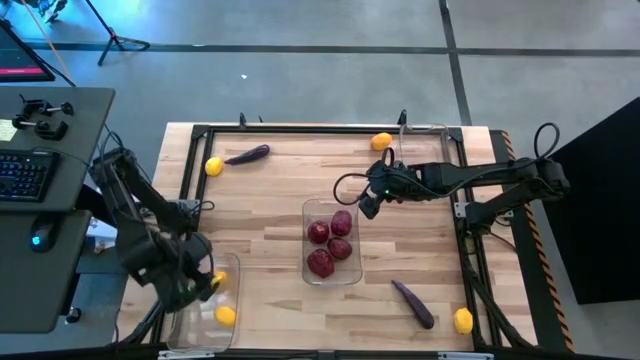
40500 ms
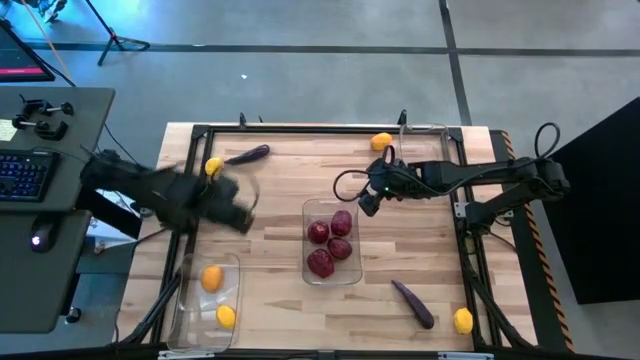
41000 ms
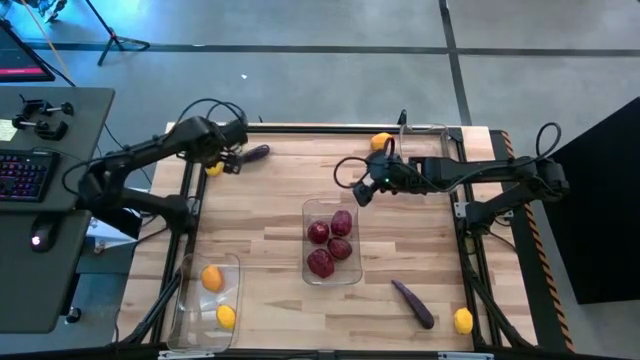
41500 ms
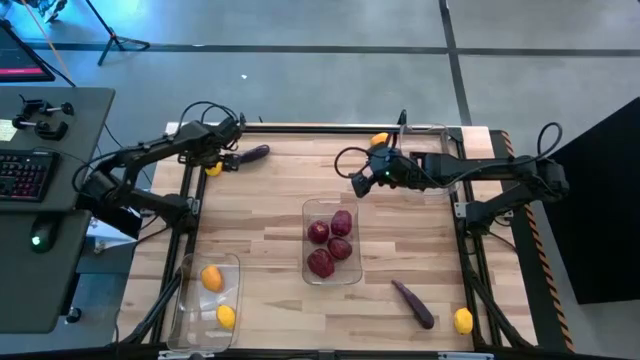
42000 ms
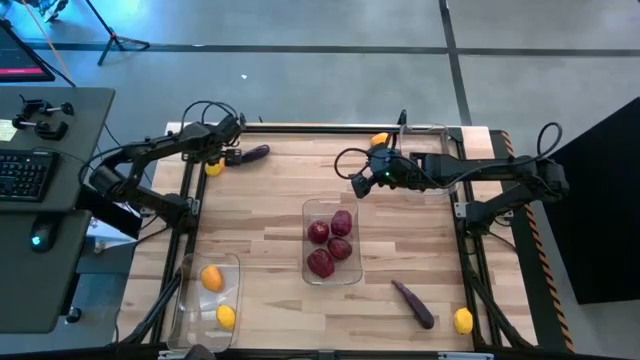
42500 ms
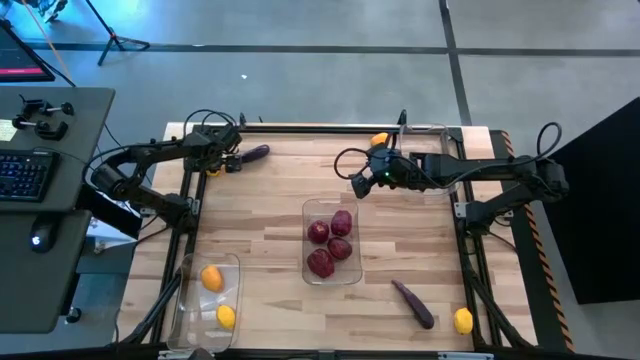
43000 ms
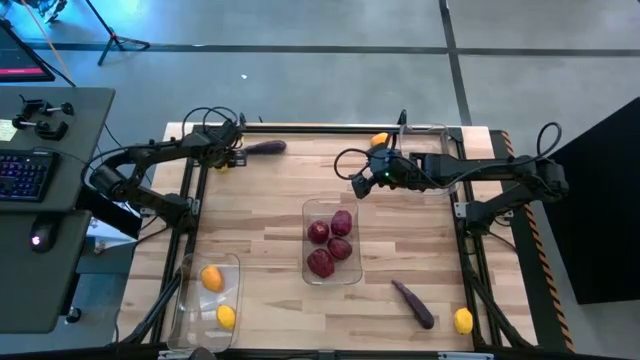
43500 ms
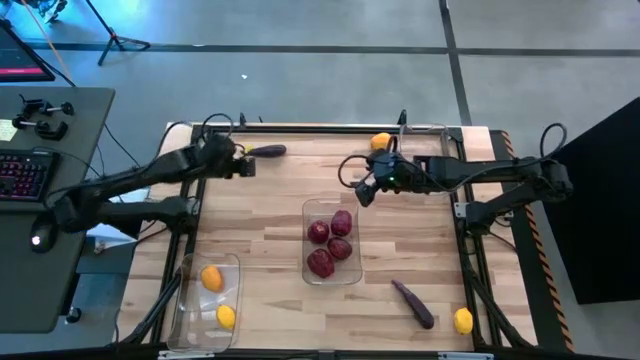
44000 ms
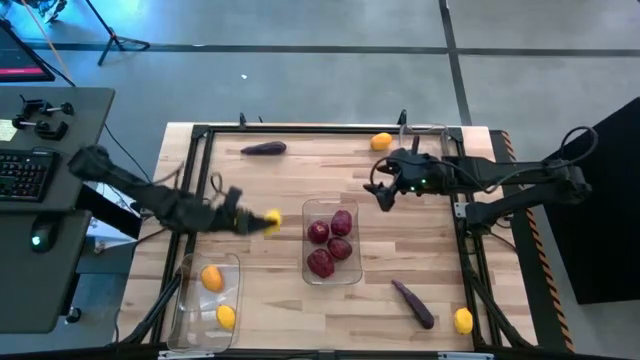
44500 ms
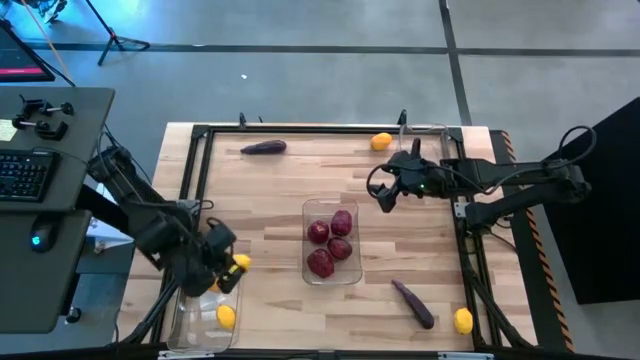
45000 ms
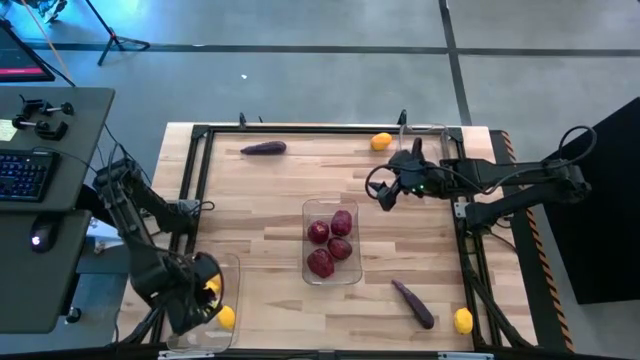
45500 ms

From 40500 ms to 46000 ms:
Task: Sort produce into baskets
Put the yellow lemon into the bottom left transparent bin

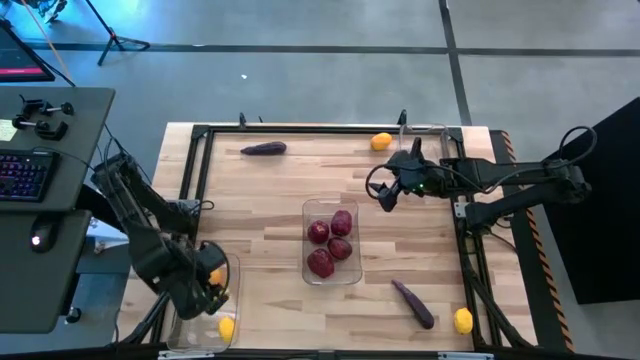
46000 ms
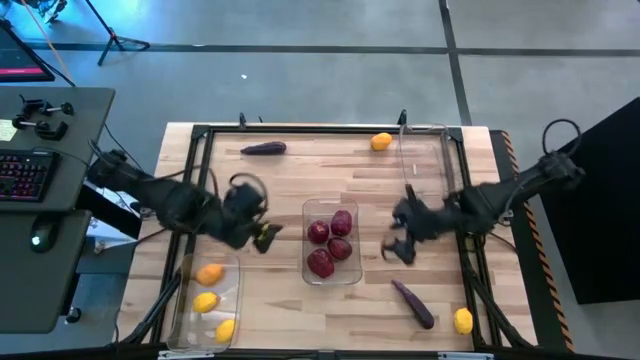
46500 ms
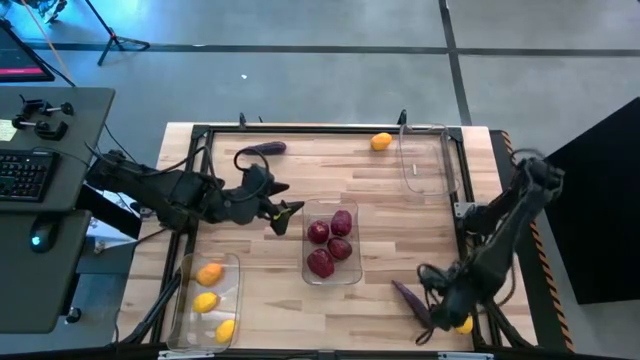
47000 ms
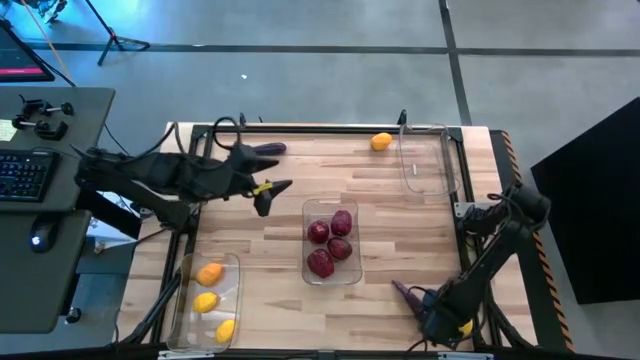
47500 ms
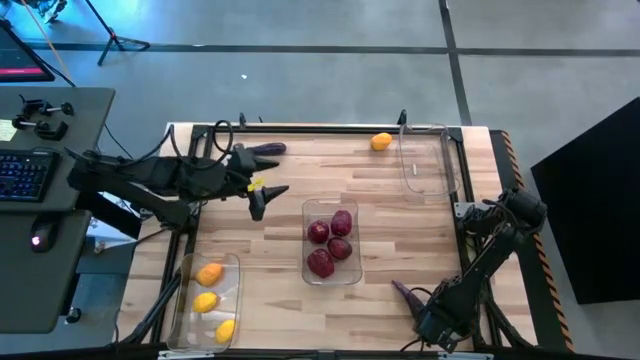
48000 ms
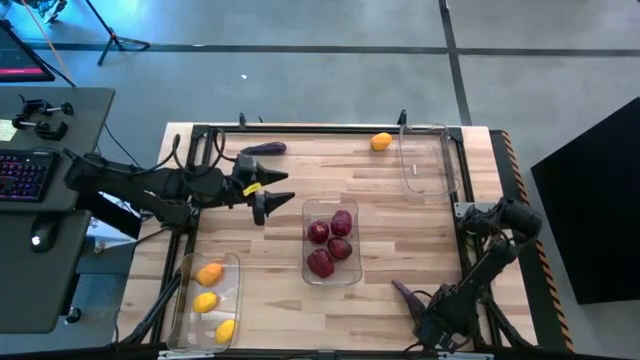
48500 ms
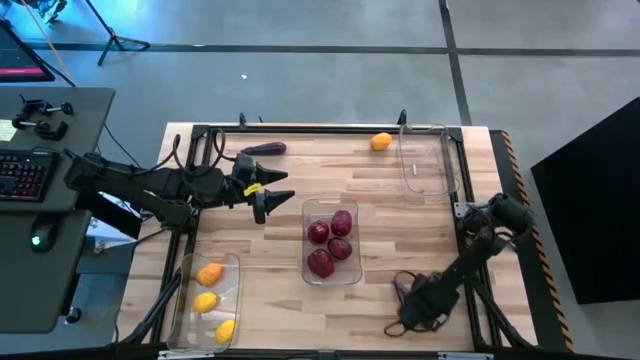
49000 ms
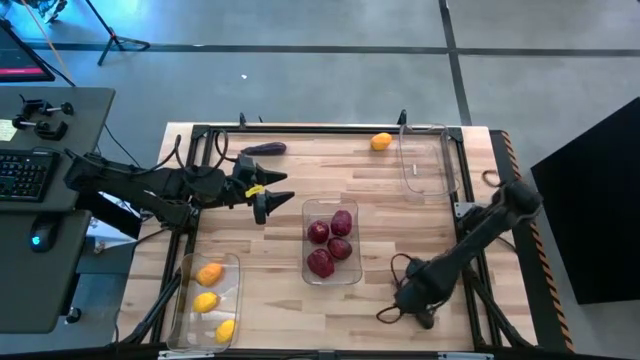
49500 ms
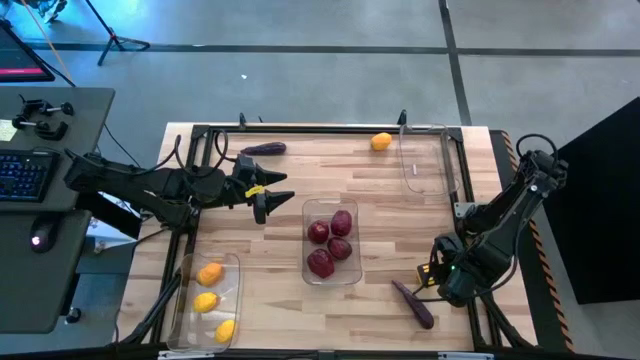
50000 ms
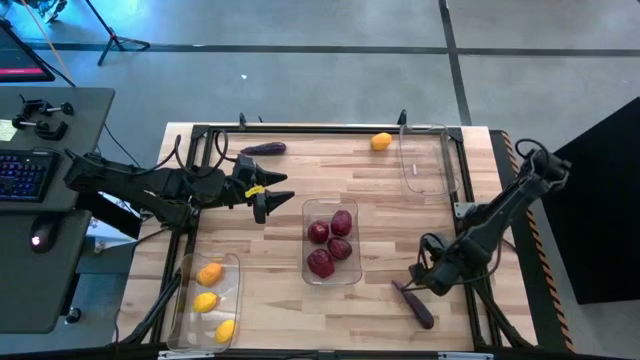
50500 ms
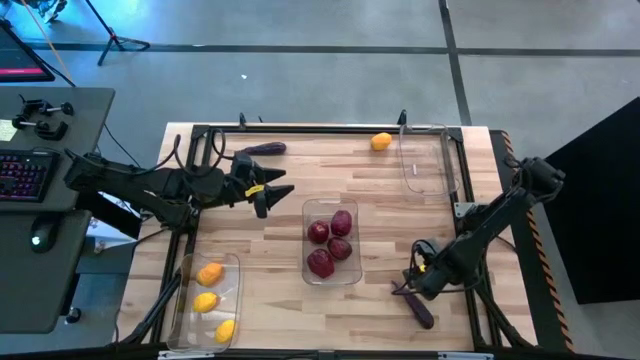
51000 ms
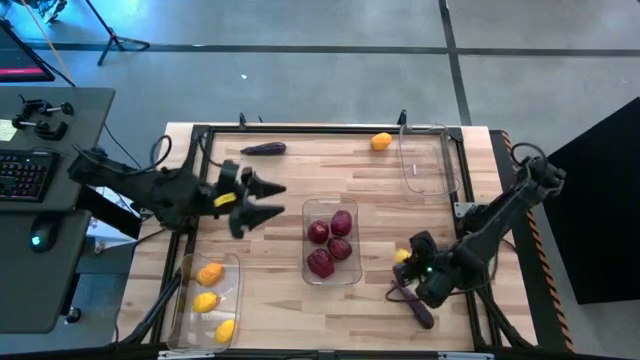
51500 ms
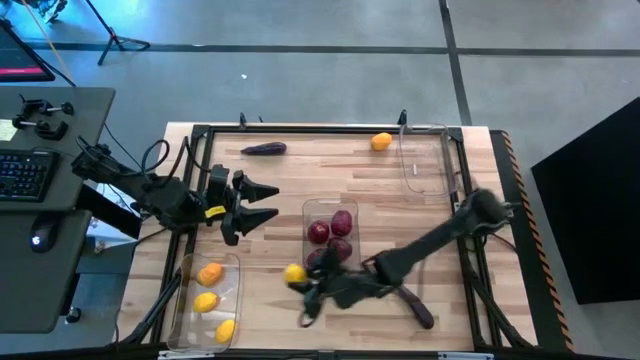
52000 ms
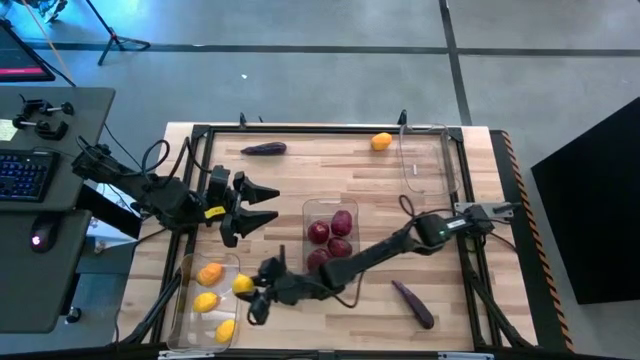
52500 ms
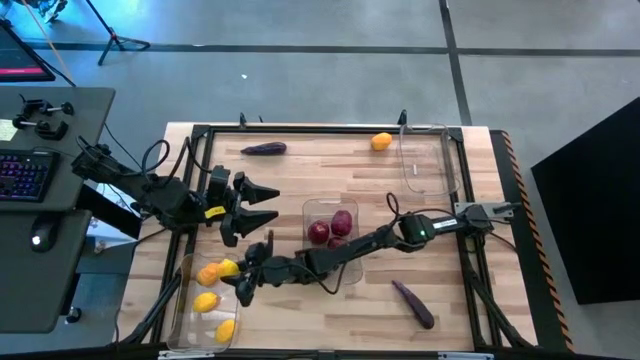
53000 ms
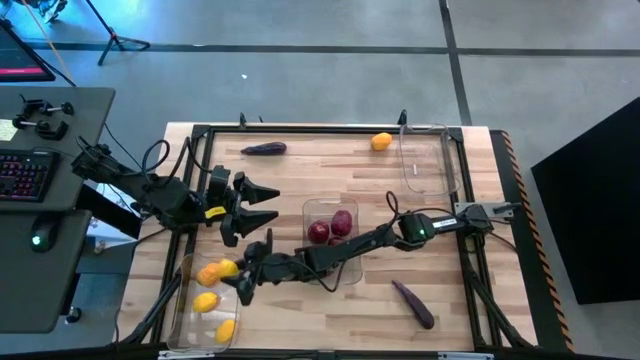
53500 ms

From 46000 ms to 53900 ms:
Put the yellow lemon into the bottom left transparent bin

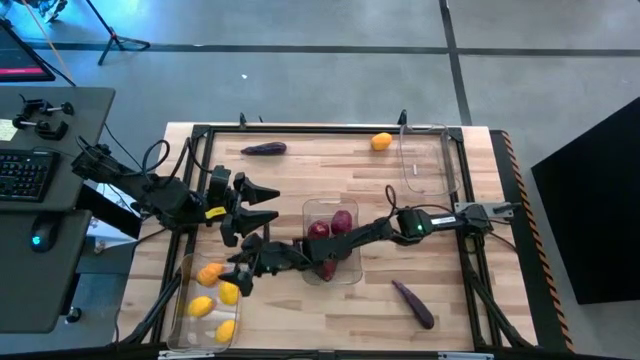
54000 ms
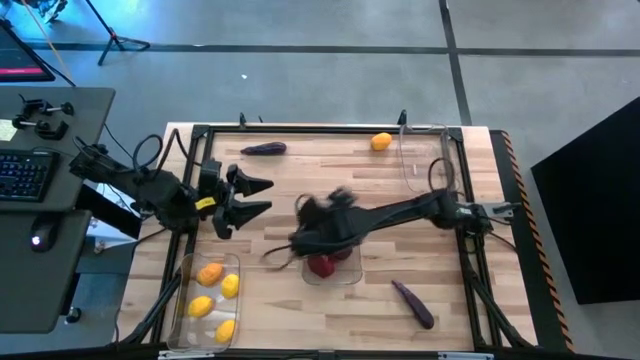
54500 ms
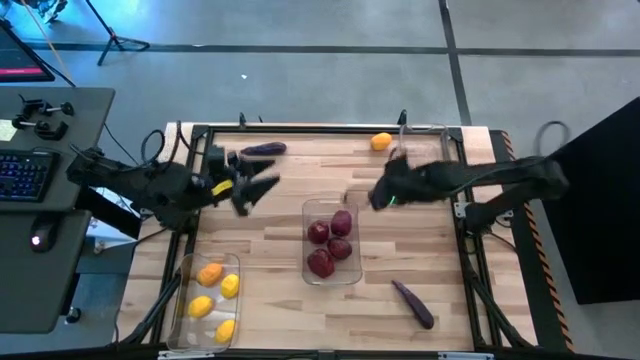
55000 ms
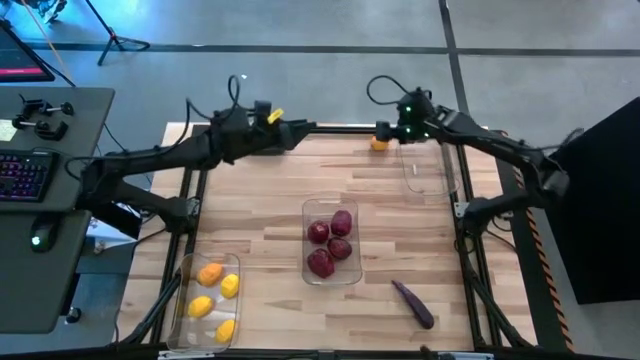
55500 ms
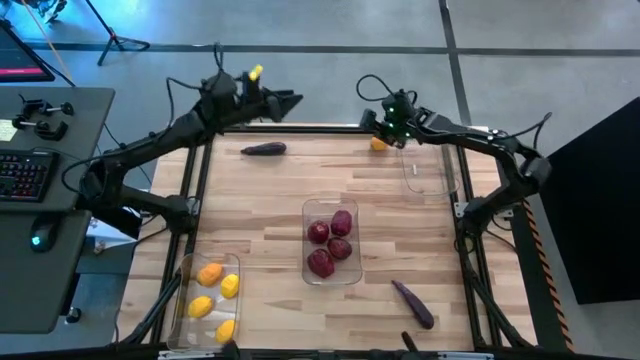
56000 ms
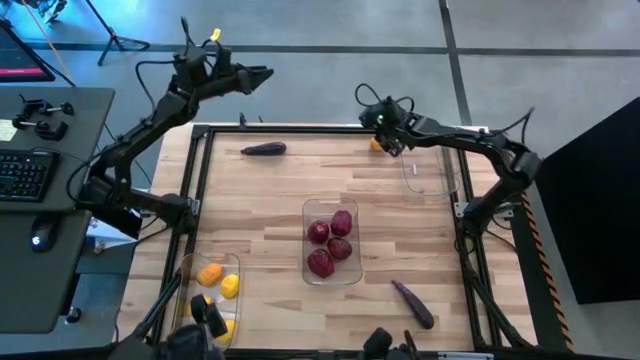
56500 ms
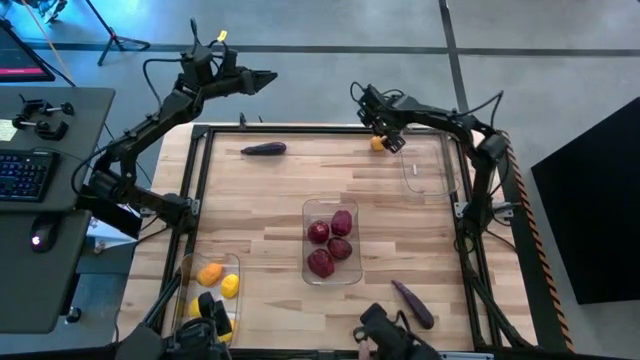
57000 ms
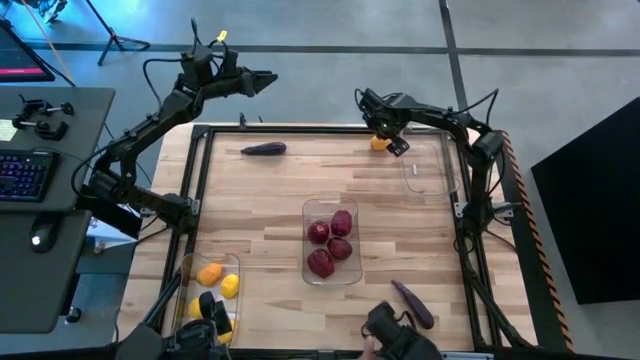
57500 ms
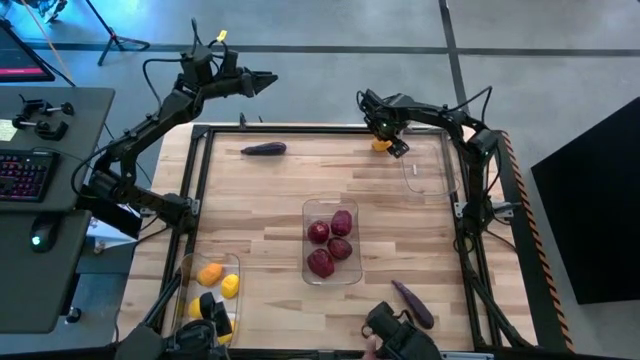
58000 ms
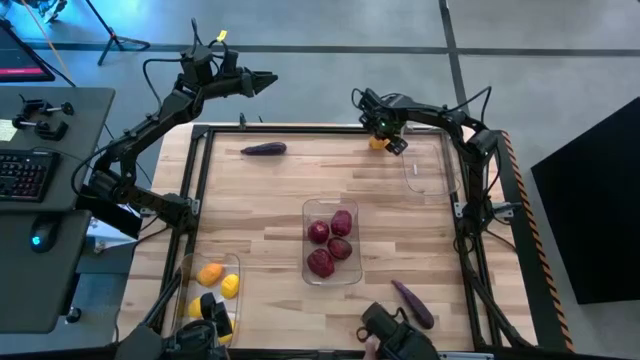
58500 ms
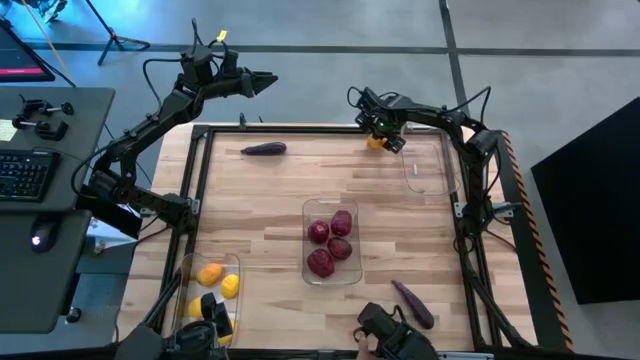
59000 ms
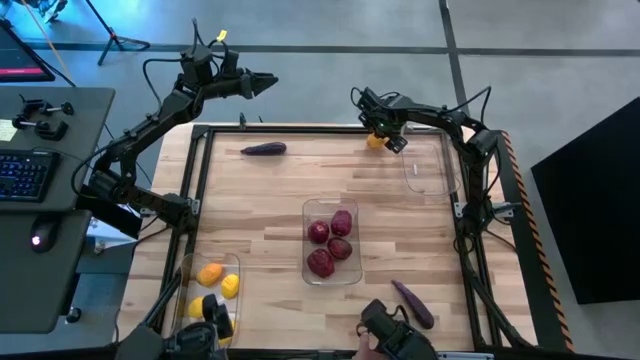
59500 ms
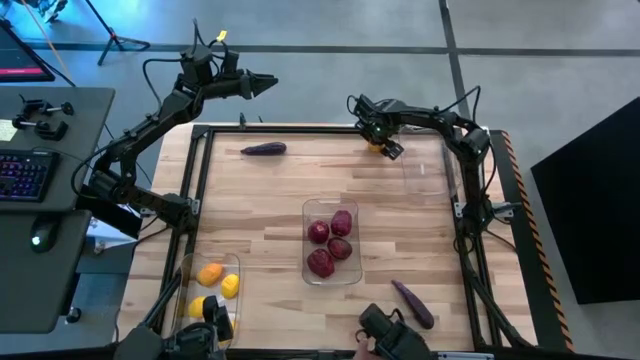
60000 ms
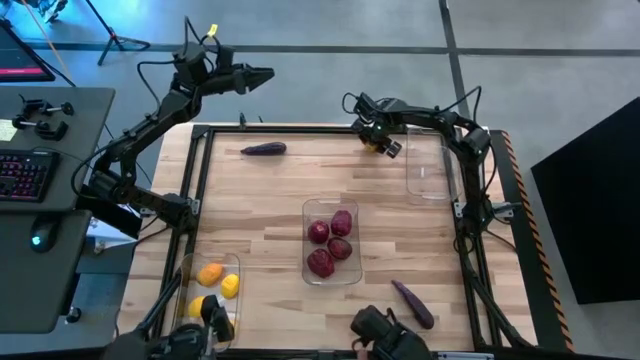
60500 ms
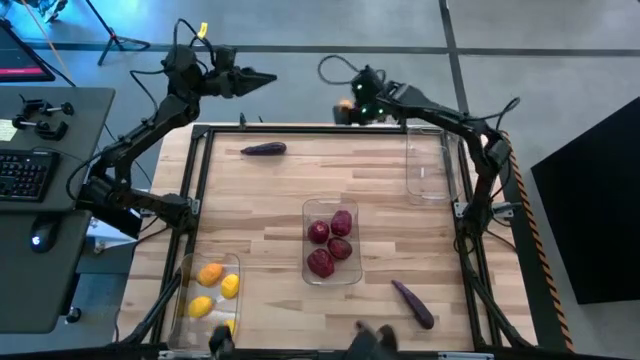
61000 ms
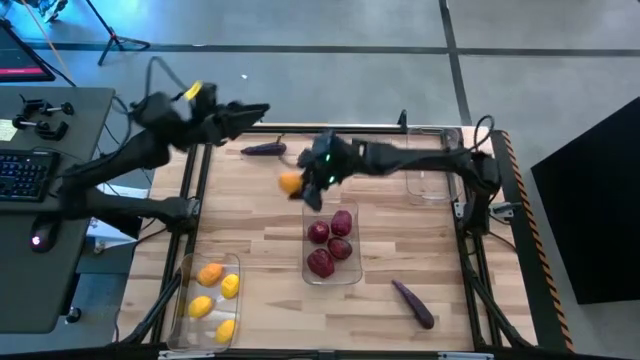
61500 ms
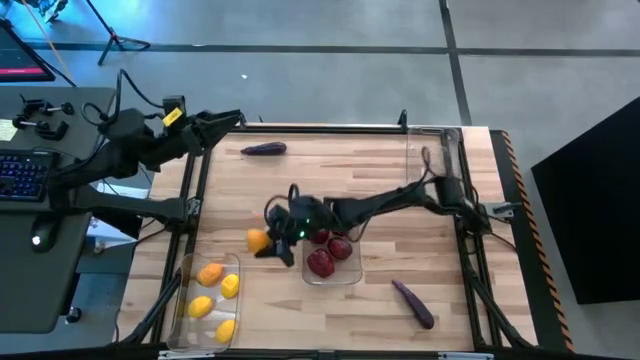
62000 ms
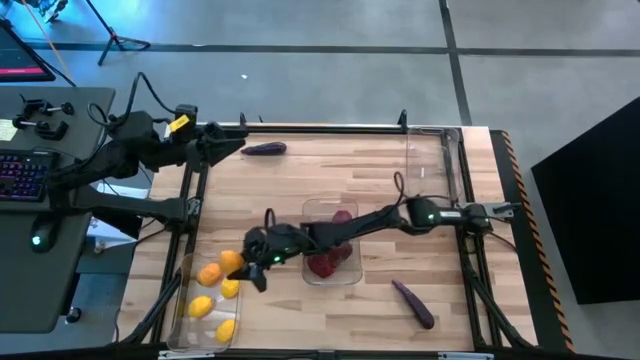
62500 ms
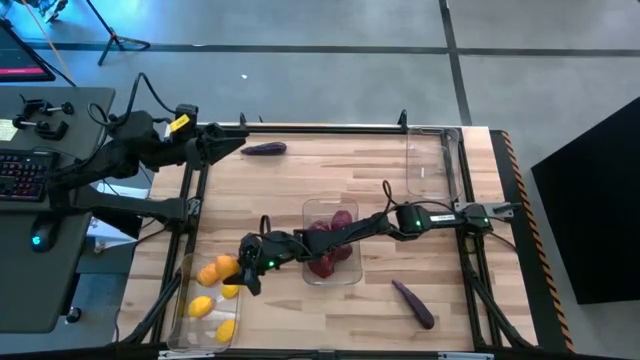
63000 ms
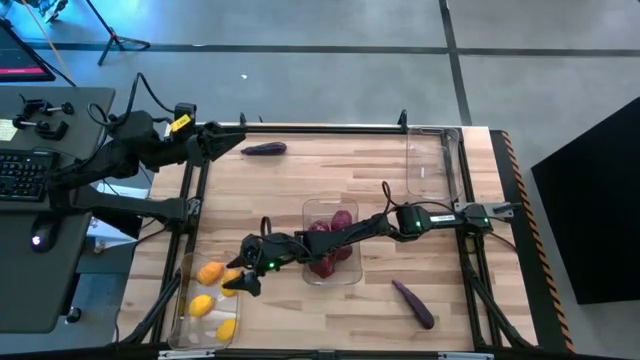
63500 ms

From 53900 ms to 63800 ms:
Put the yellow lemon into the bottom left transparent bin
